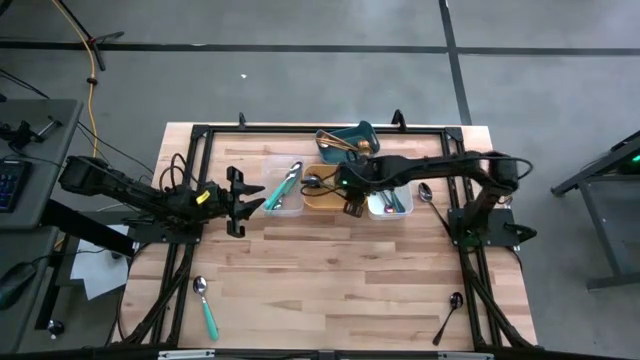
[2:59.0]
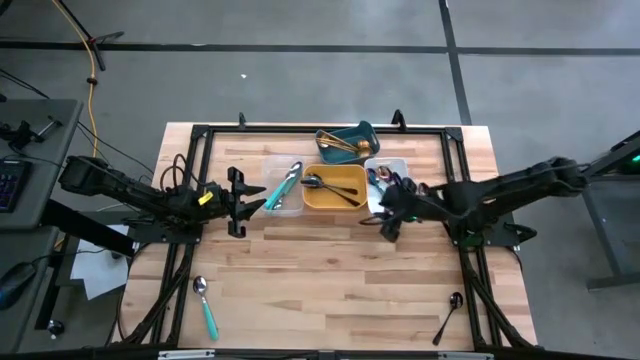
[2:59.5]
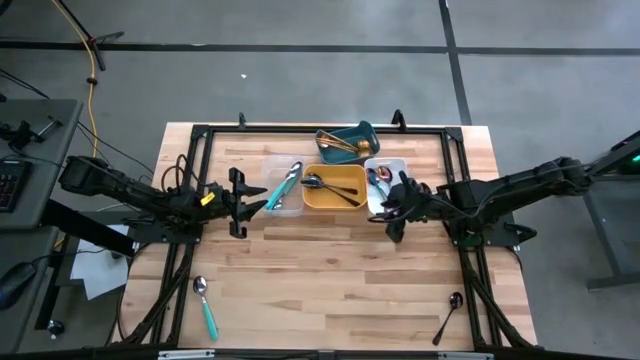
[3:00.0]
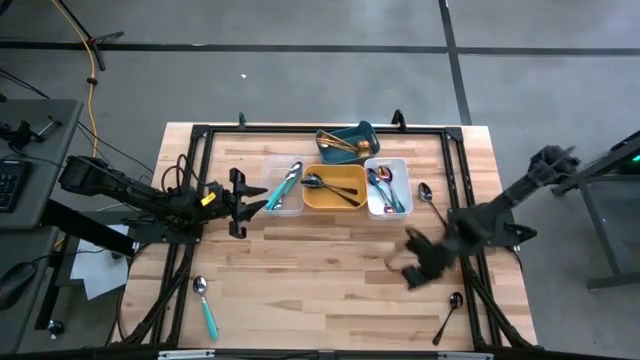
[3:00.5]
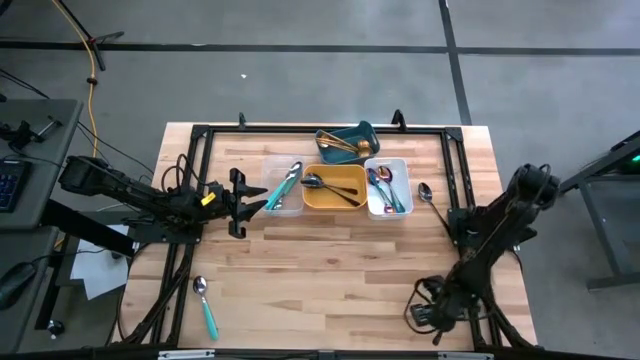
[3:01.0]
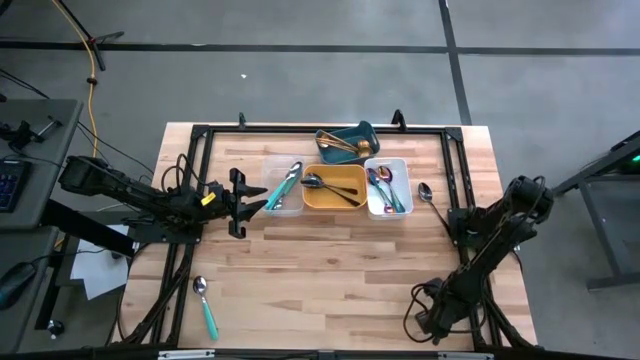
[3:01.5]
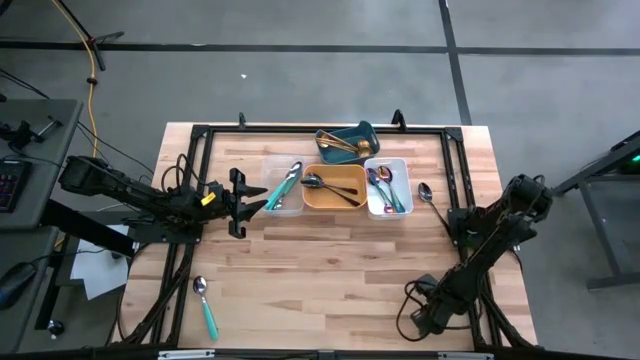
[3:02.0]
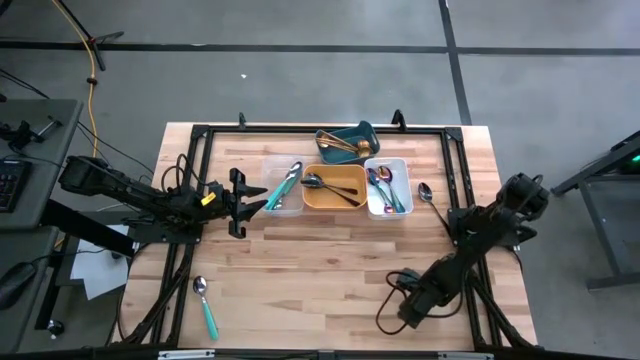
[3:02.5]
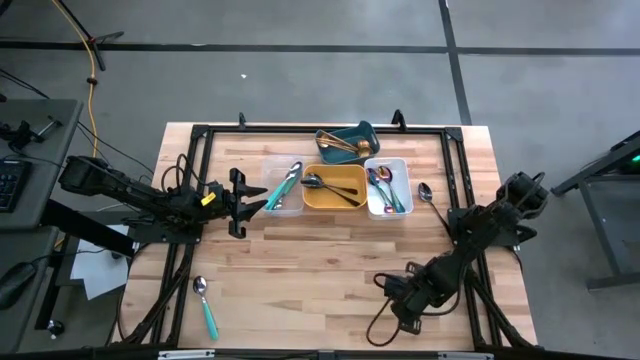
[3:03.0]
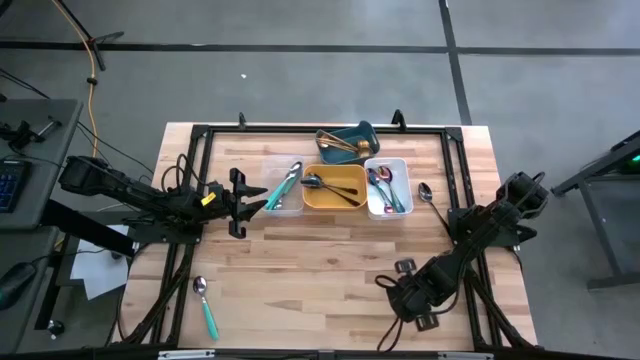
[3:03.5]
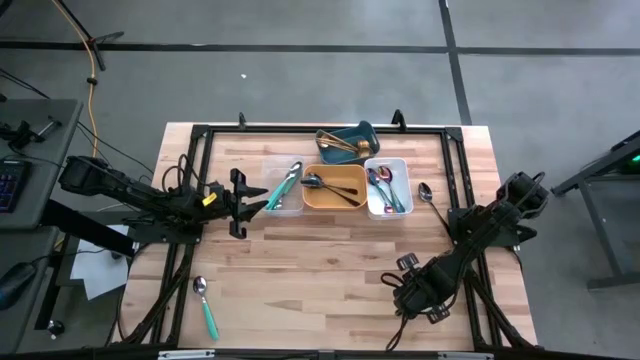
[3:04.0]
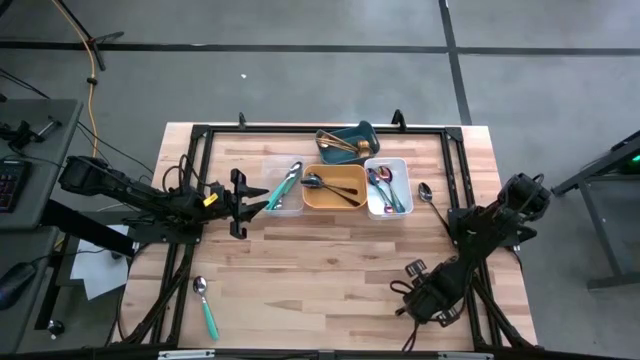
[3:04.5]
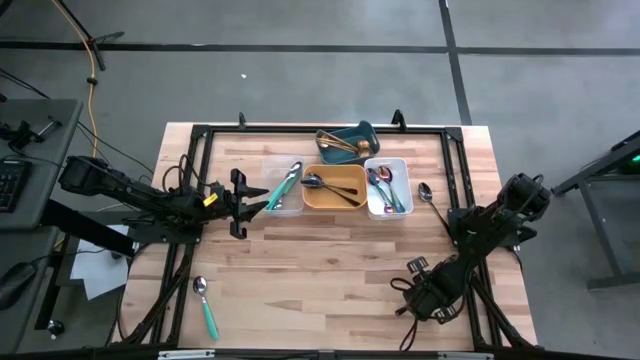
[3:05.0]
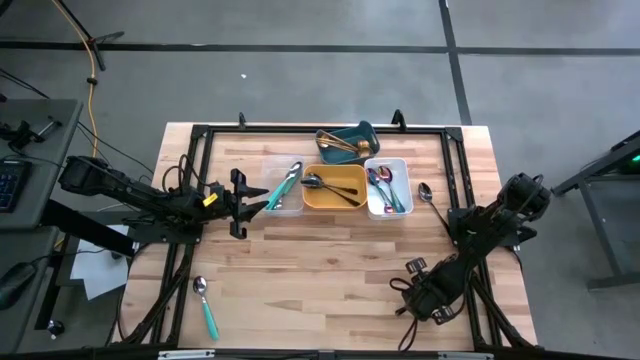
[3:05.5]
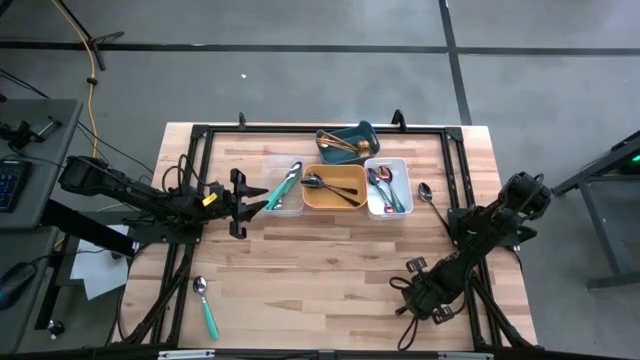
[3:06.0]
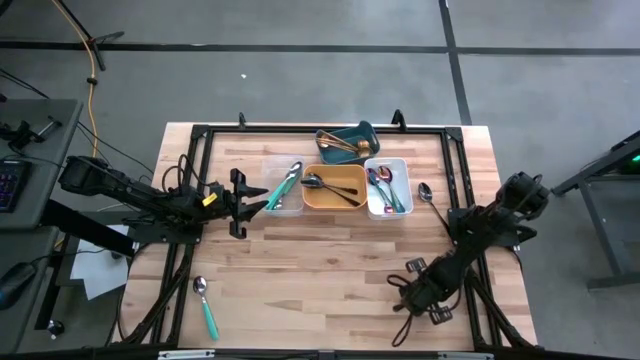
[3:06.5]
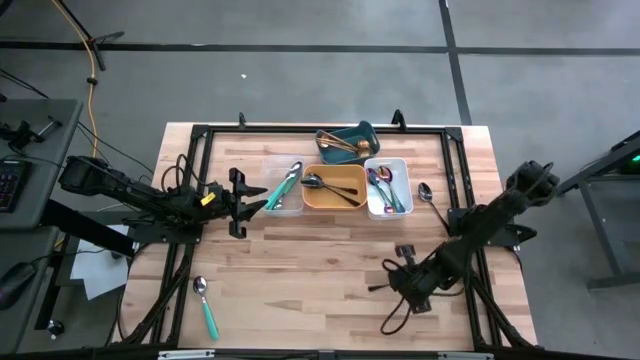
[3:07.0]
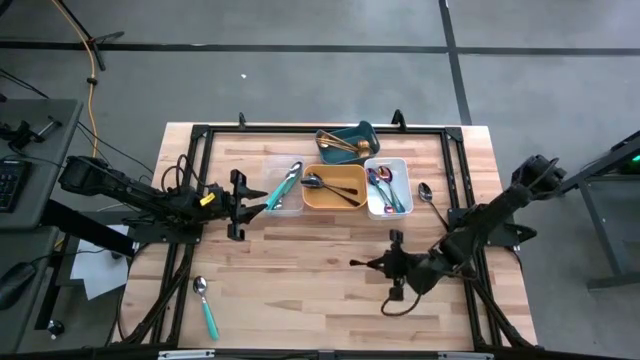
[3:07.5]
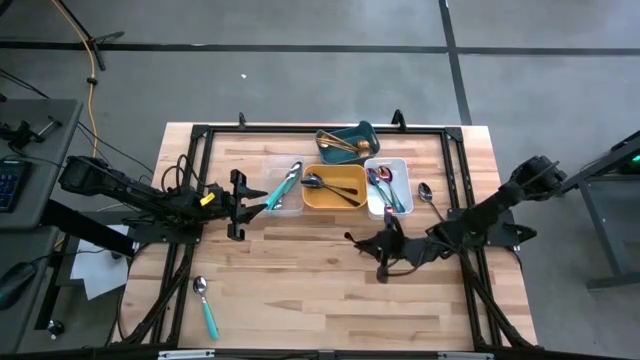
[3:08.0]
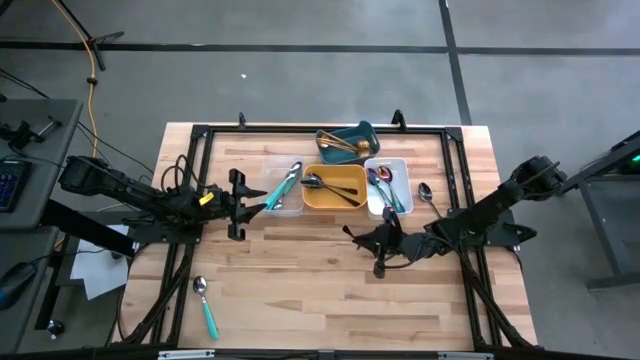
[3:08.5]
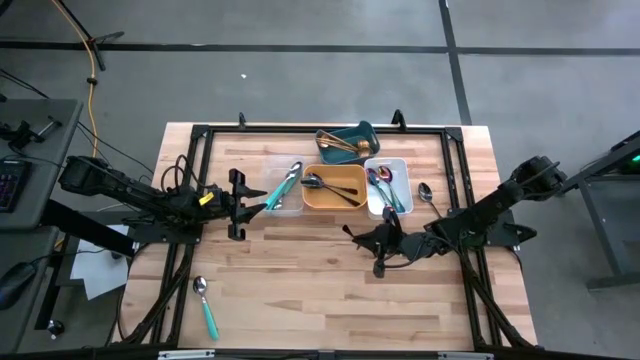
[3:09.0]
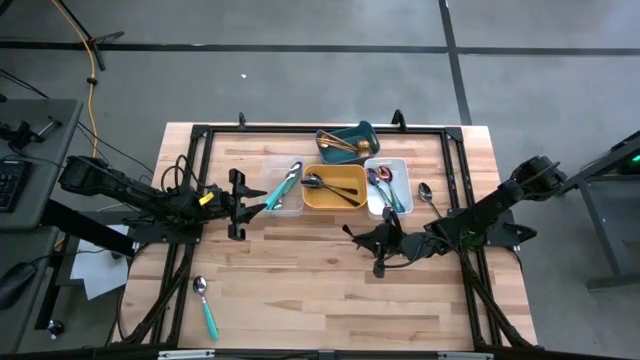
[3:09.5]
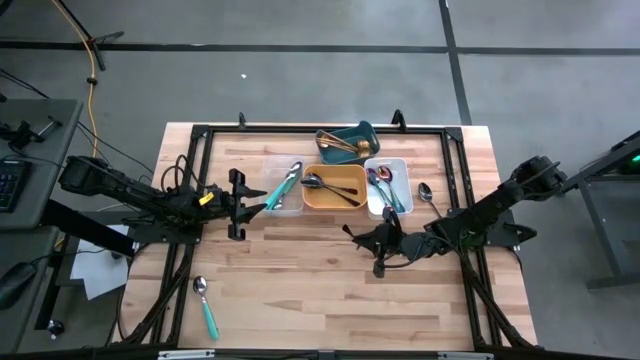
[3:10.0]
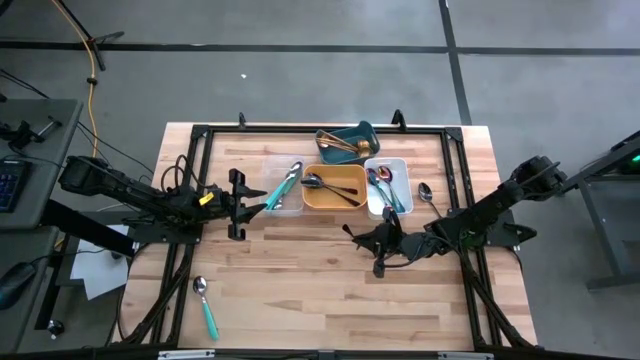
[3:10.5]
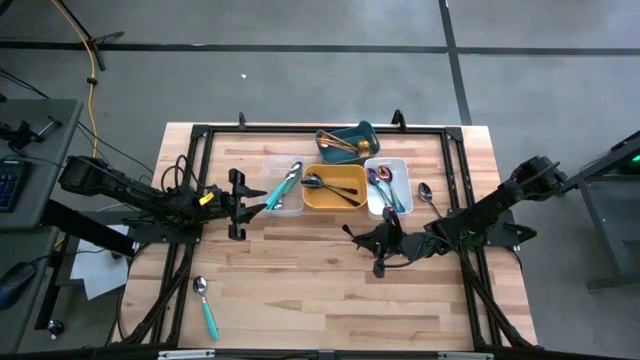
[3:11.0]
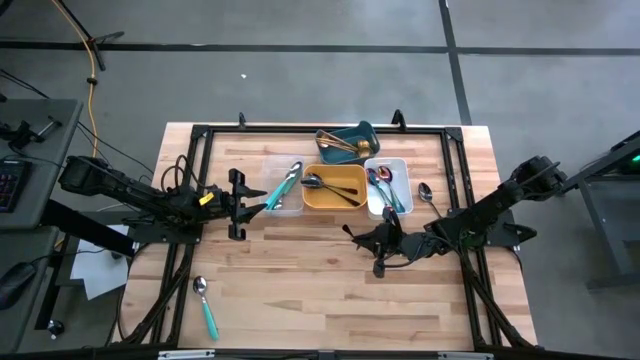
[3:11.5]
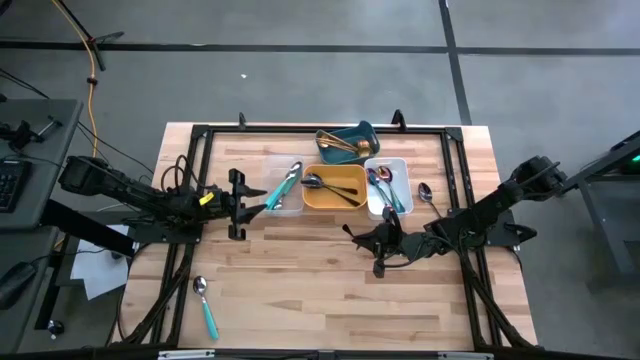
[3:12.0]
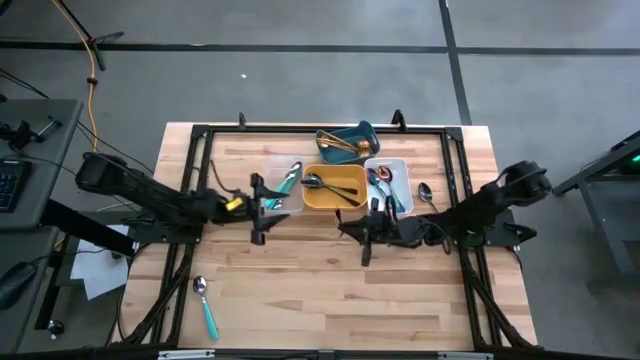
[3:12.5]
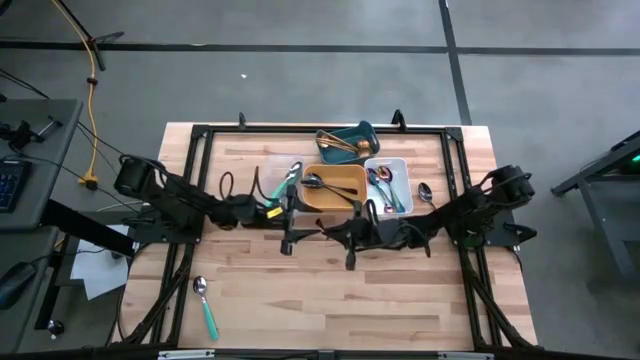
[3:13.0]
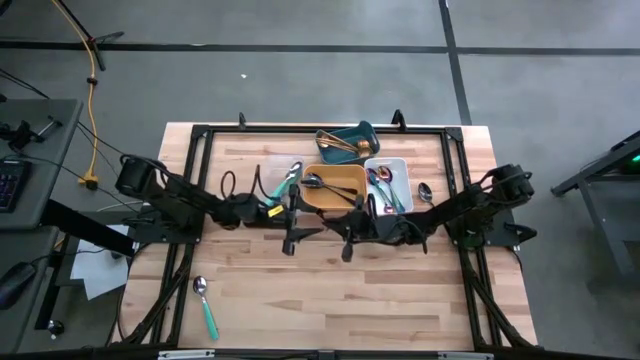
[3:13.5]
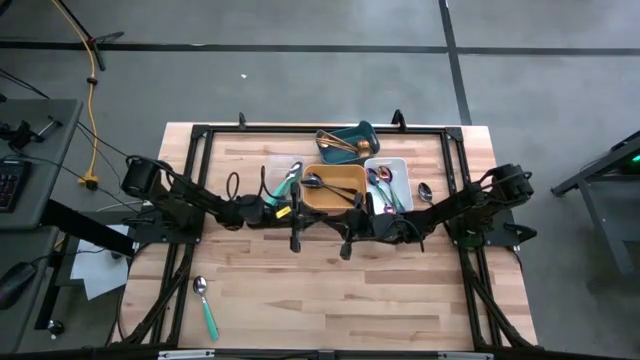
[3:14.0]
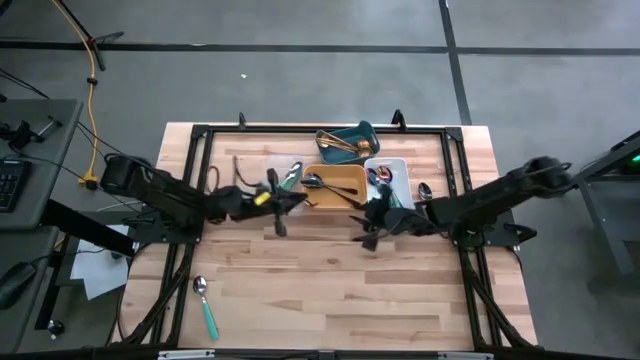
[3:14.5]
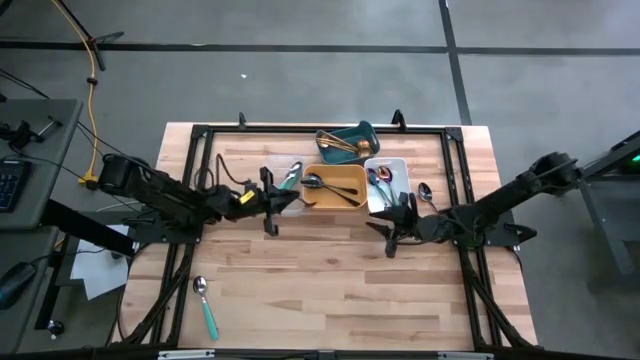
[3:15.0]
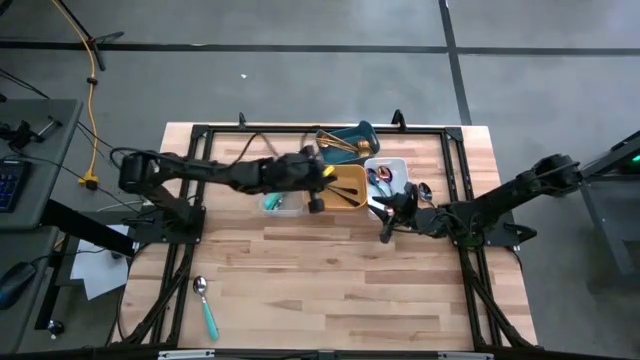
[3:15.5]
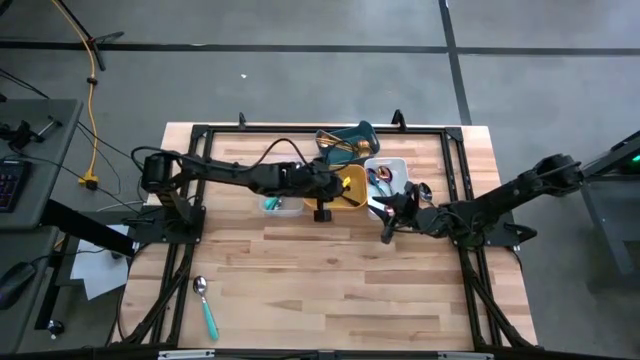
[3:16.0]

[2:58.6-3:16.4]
Task: Sort silverware by color (type)
Put the silver spoon into the orange bin

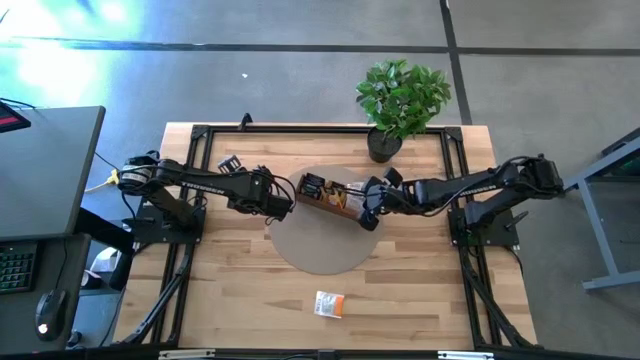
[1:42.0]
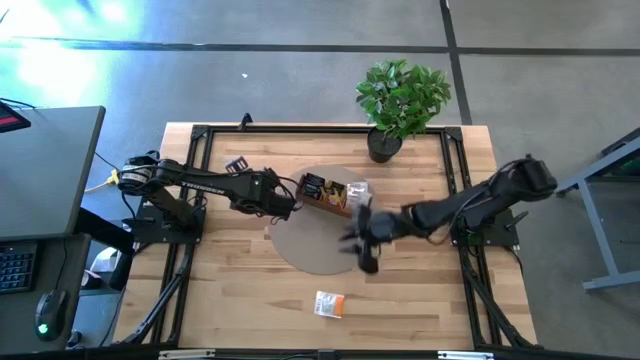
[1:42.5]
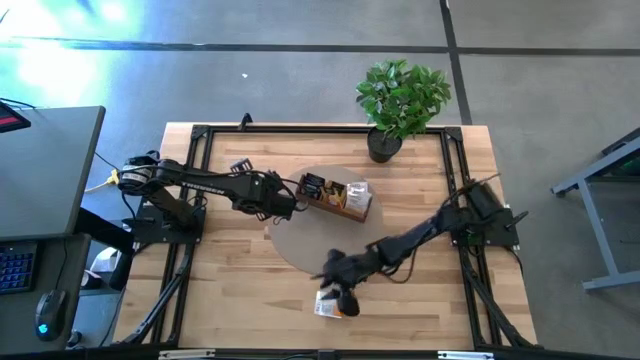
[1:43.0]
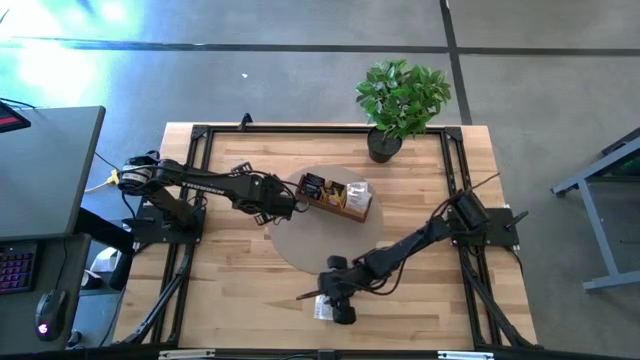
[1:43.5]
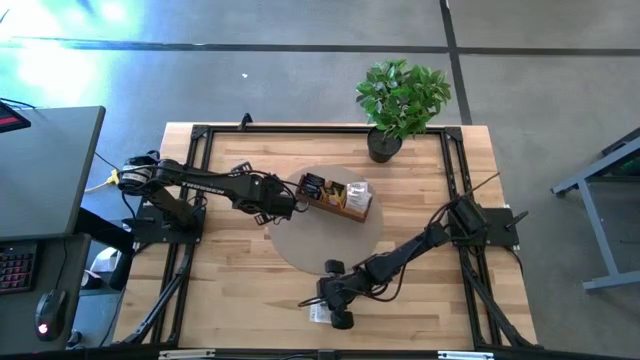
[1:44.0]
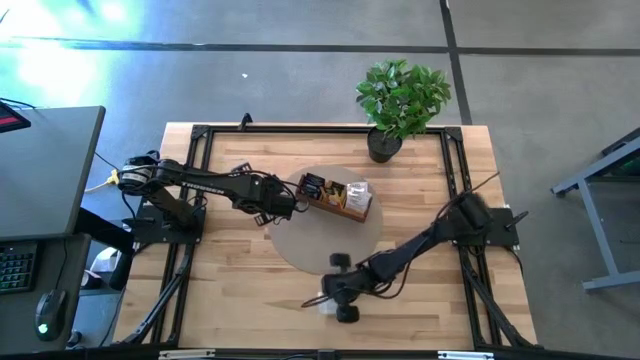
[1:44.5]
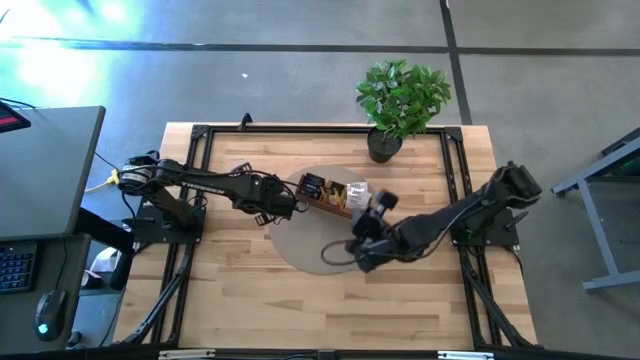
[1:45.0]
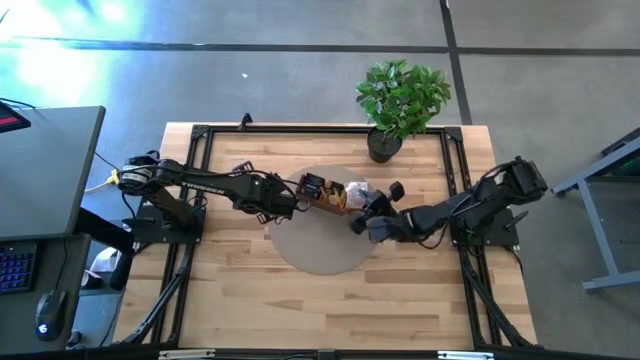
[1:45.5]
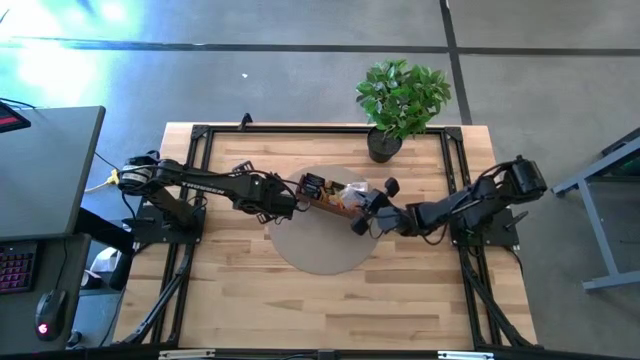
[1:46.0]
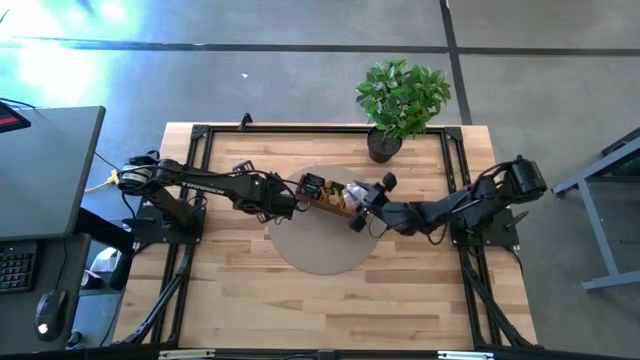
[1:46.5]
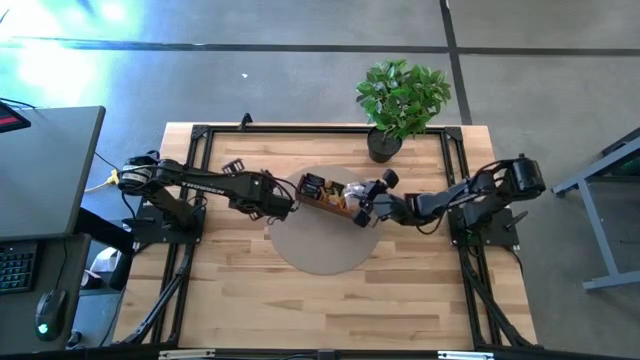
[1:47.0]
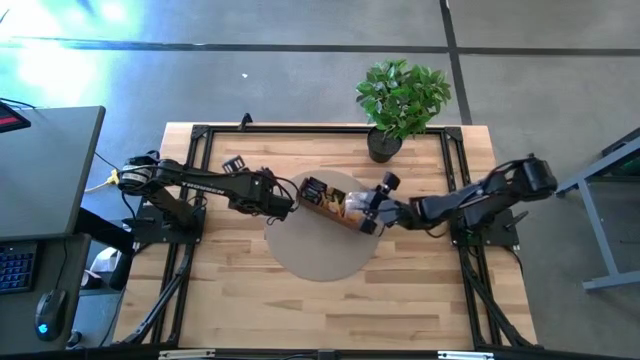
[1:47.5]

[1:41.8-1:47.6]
Task: Pick & Place Tea
Put the white tea bag into the right side area of the wooden organizer
